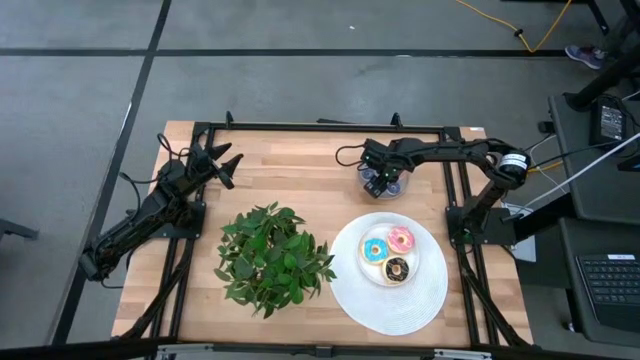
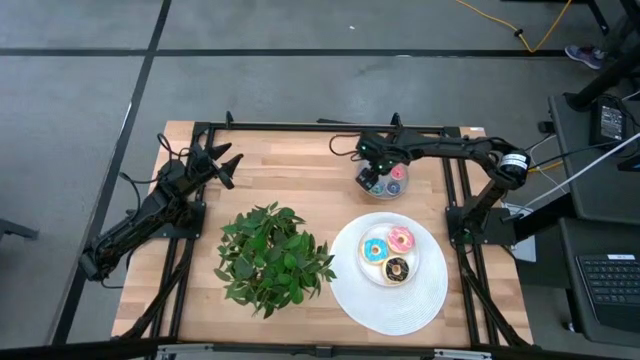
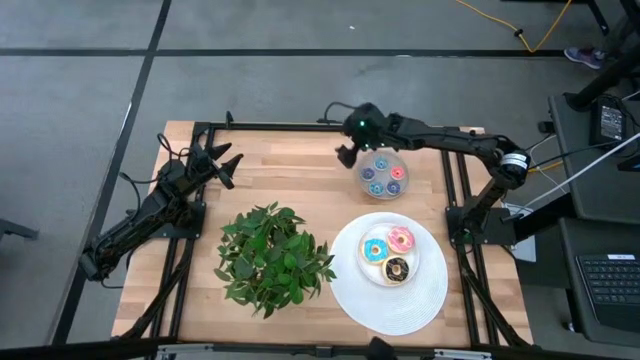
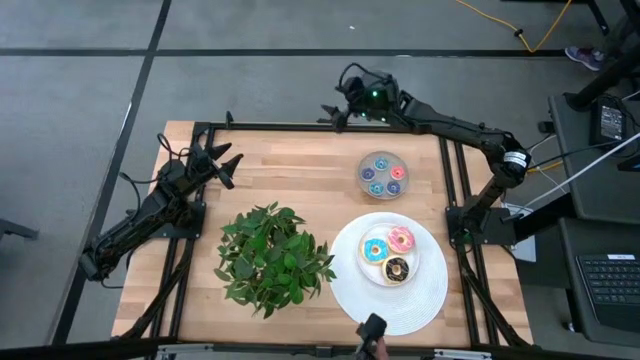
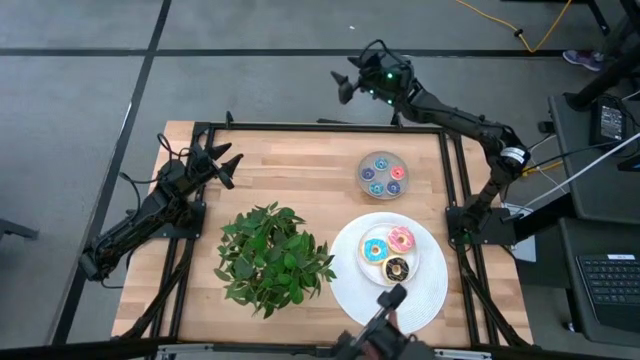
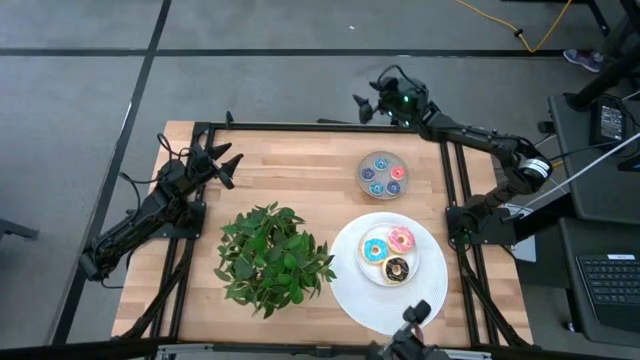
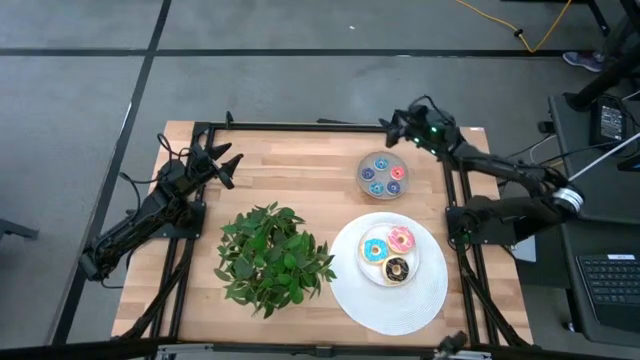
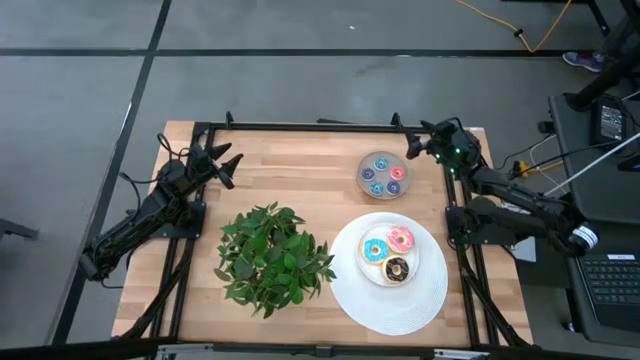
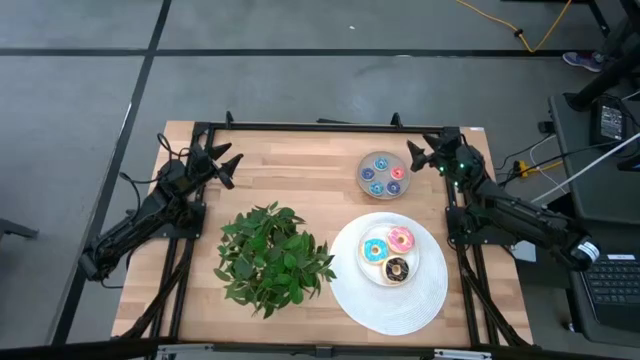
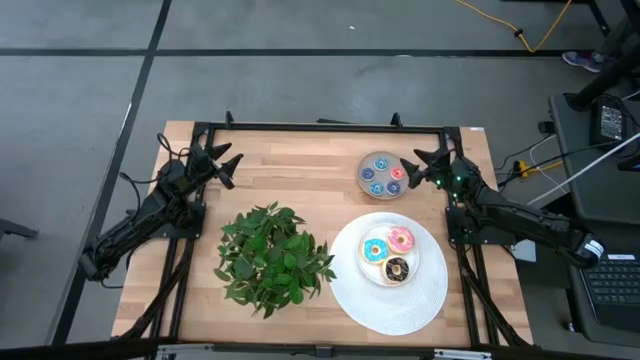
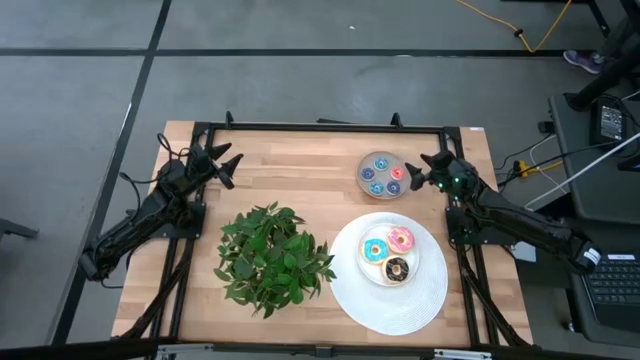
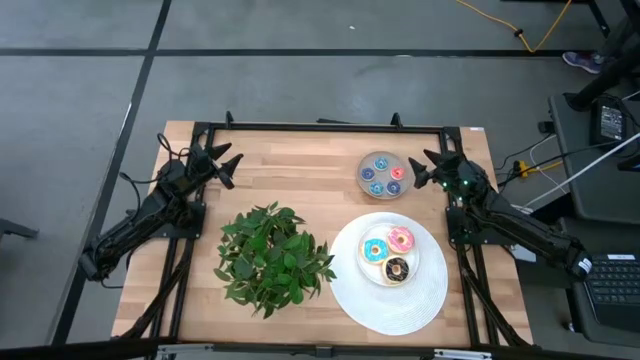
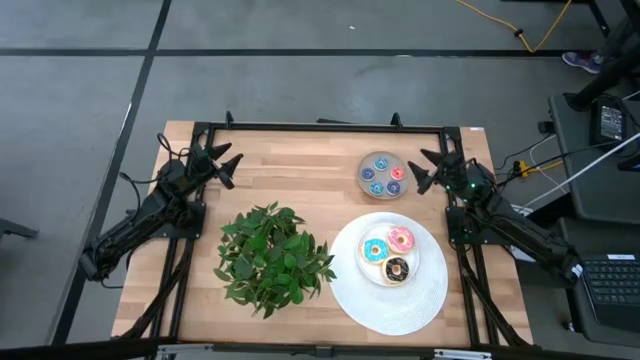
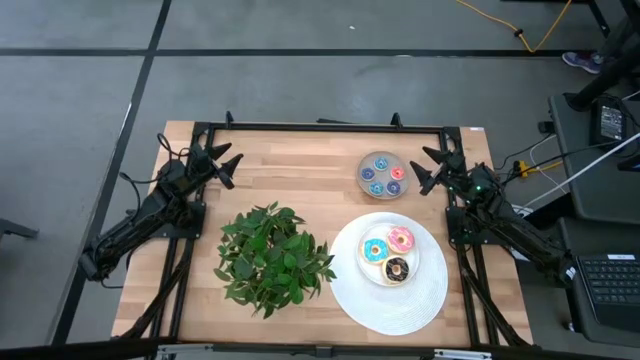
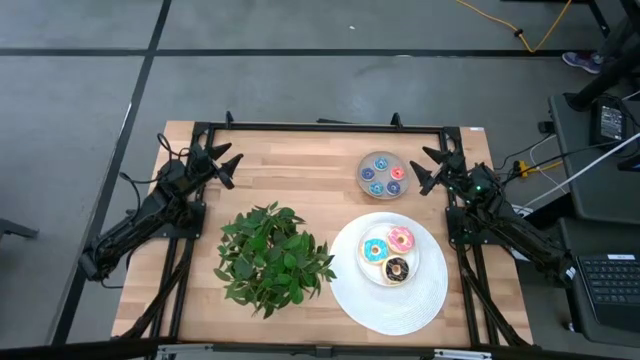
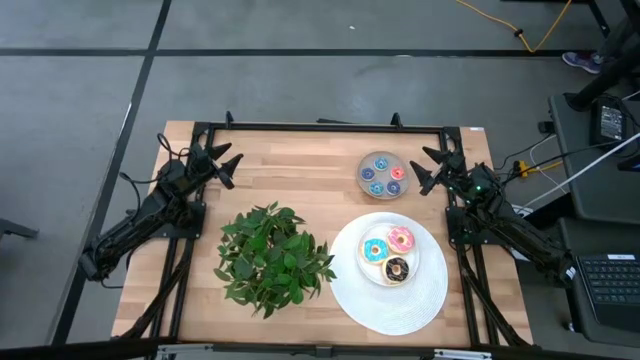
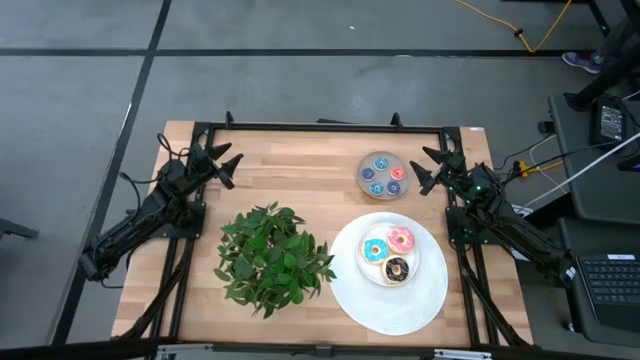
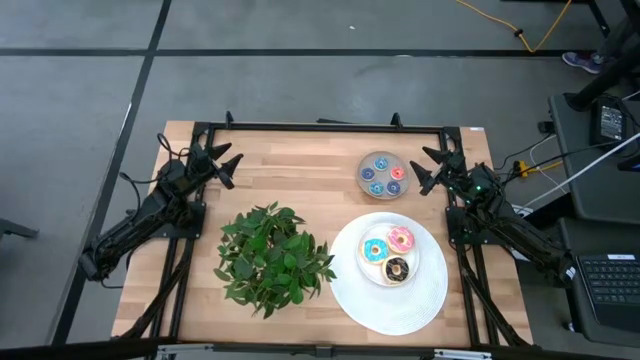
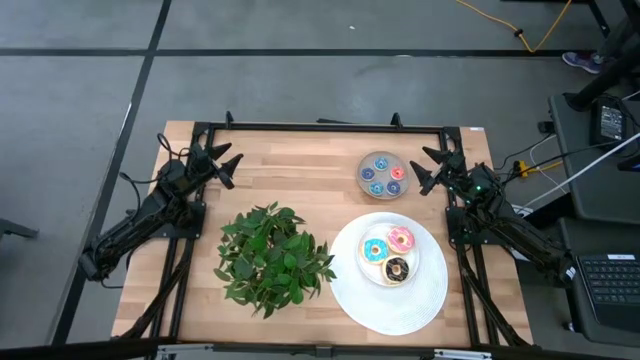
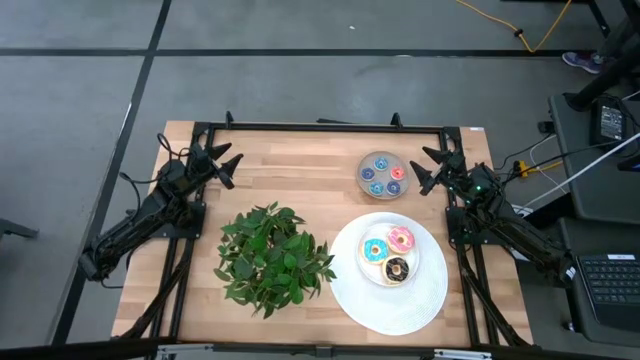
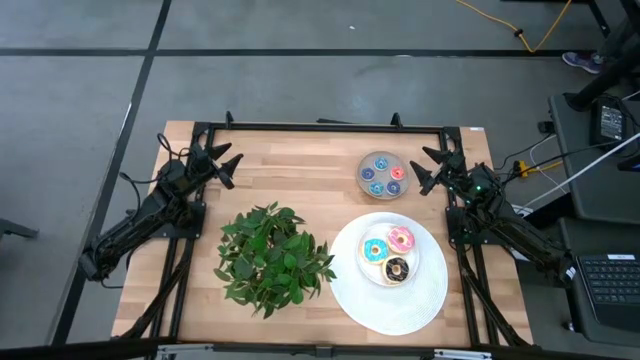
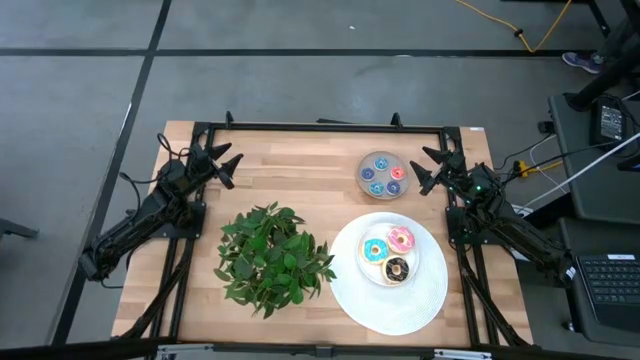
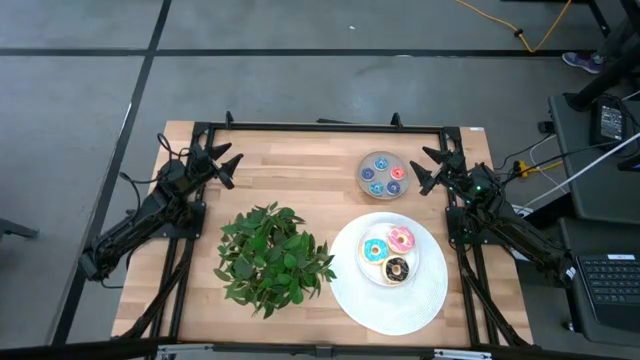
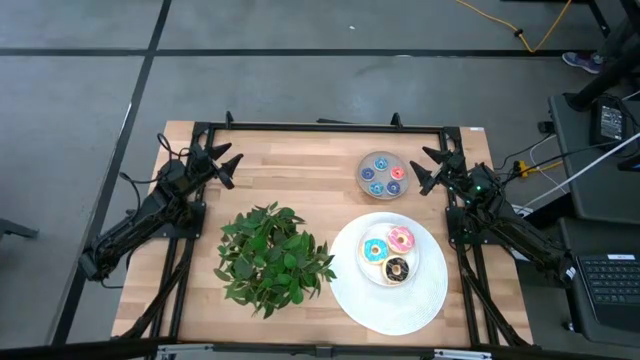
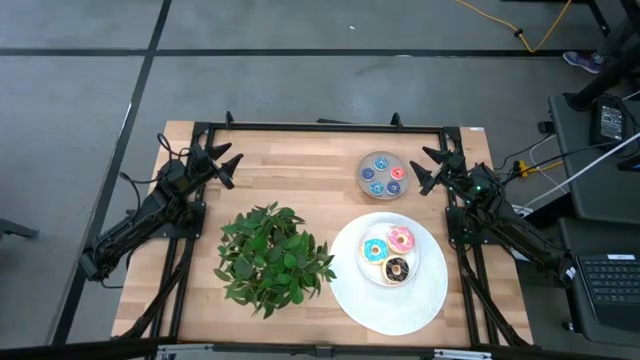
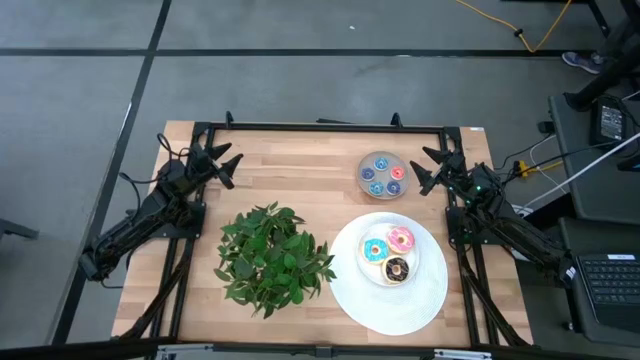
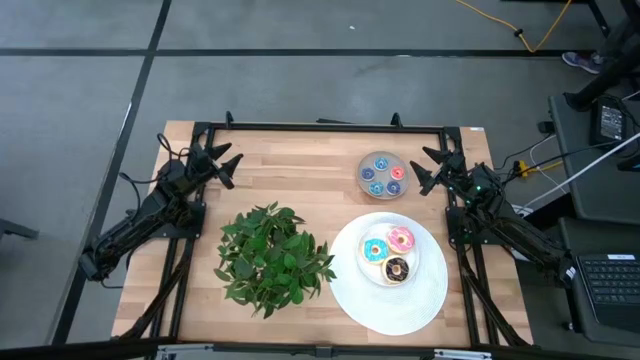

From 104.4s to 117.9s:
Task: Pick & Place donuts
Return to Home Position

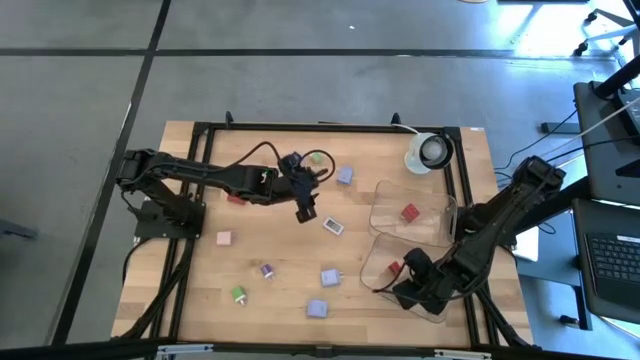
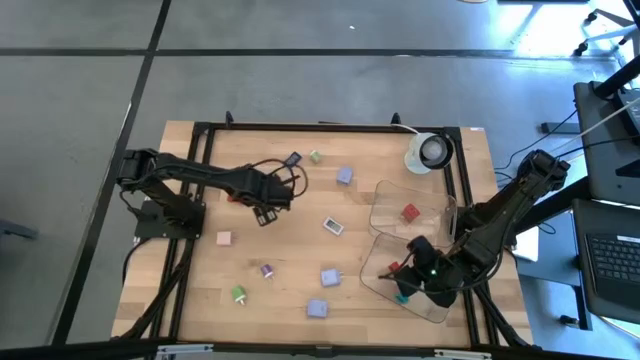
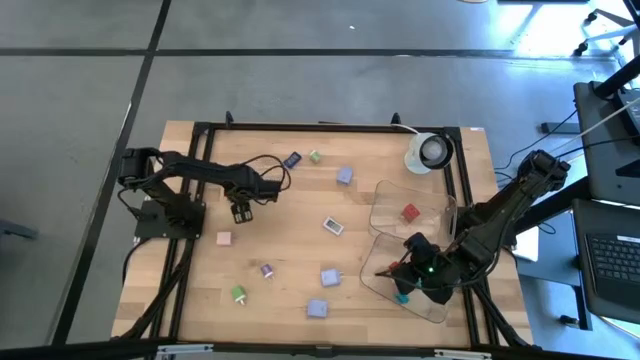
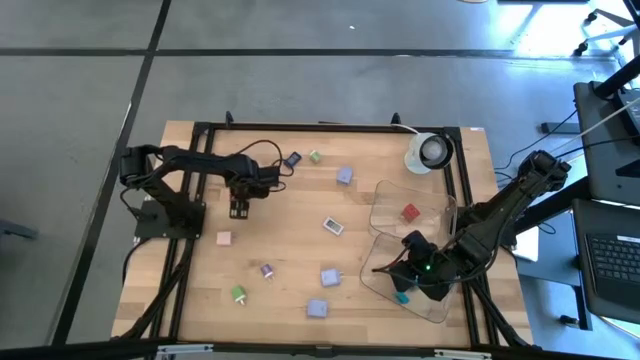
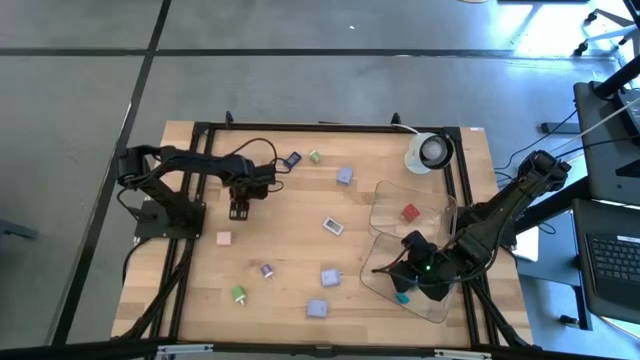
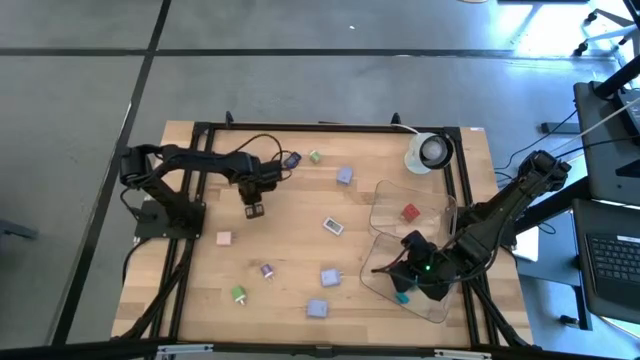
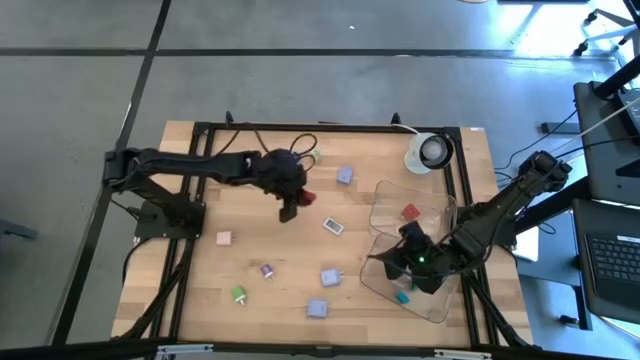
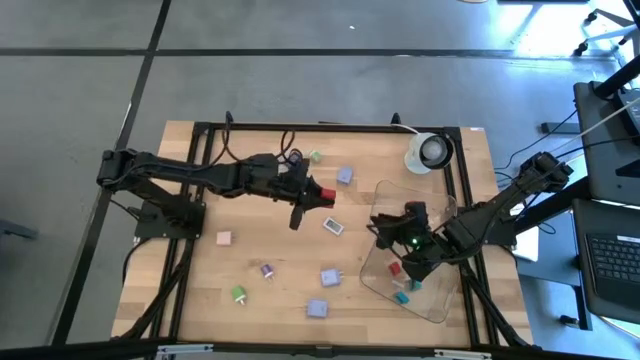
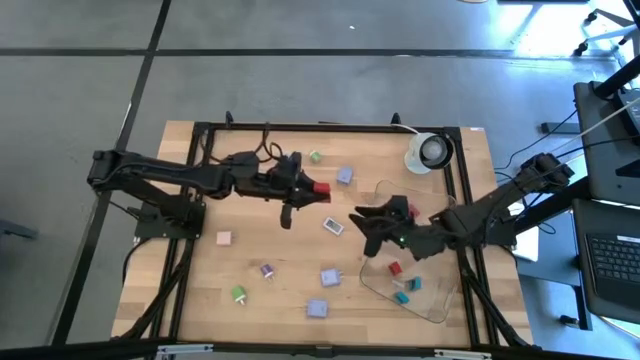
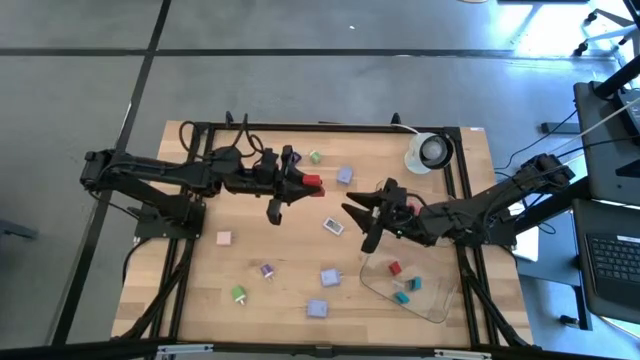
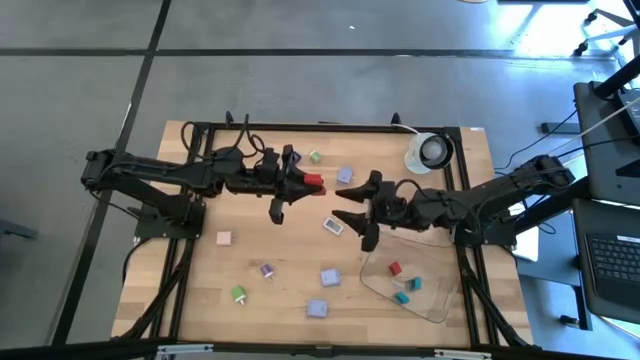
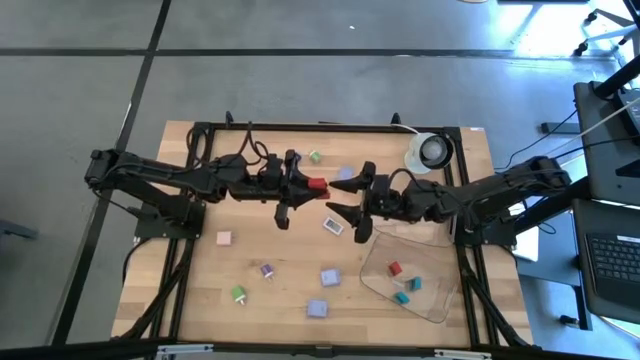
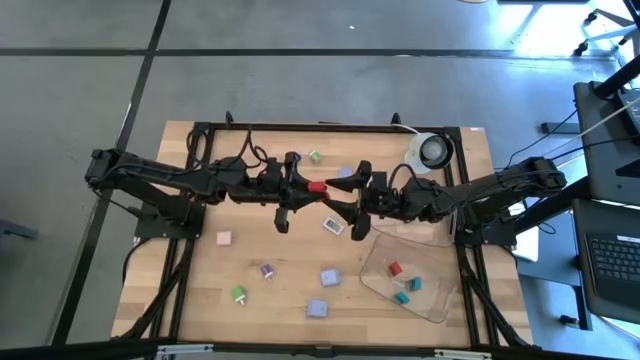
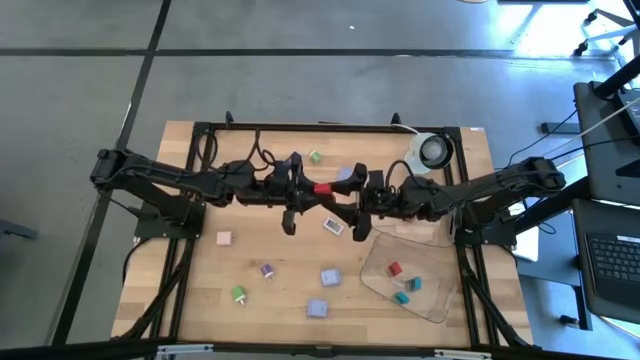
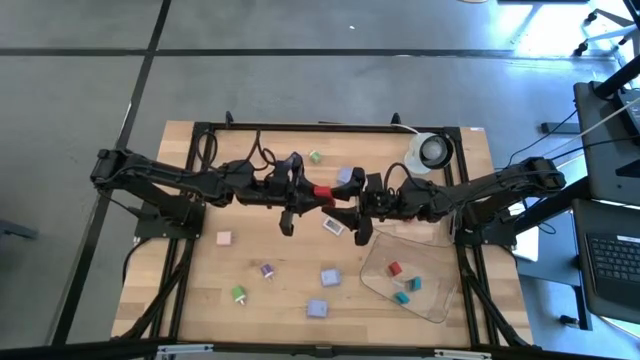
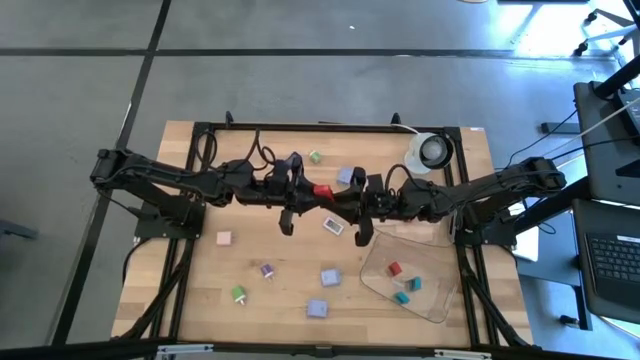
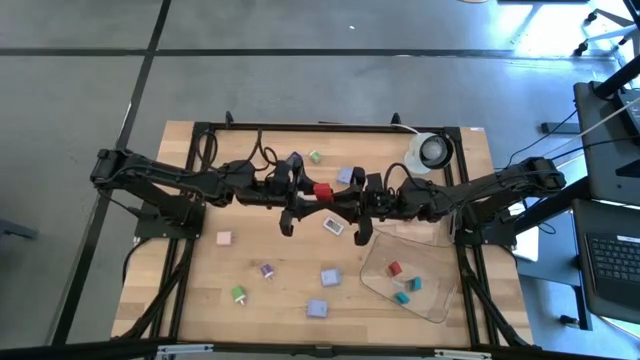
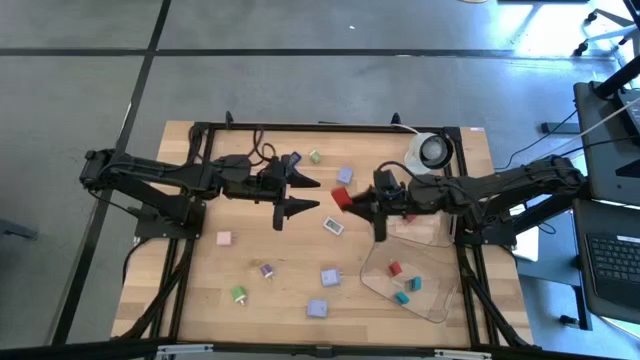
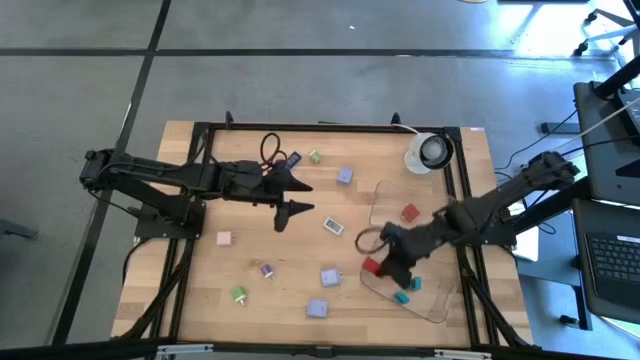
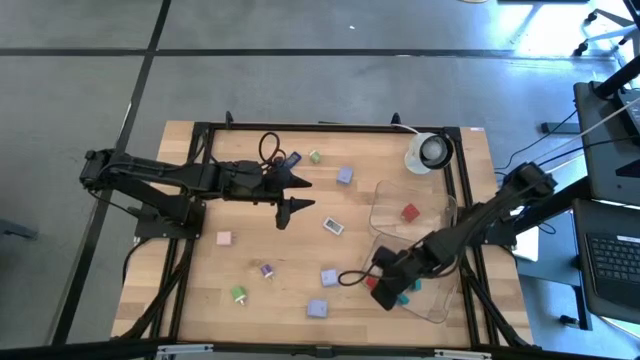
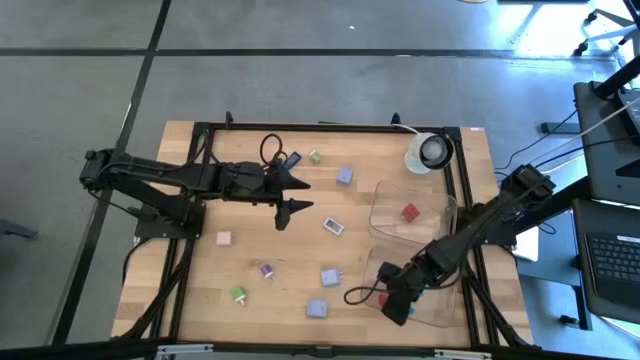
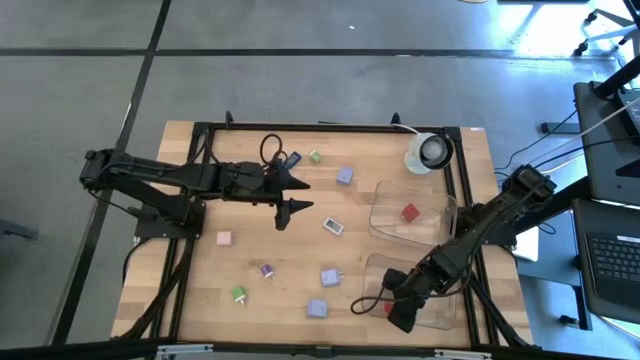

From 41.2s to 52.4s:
Task: Pick & Place Office items
Put the red digital timer into the bottom transparent bin
